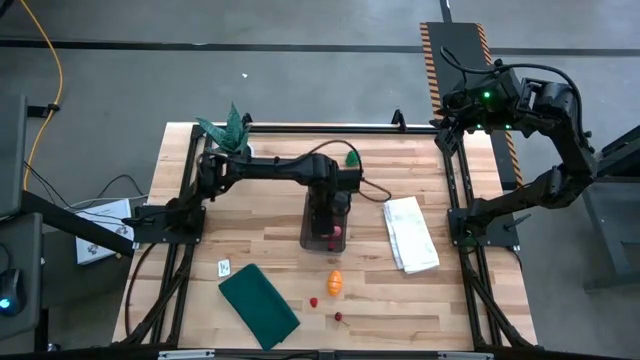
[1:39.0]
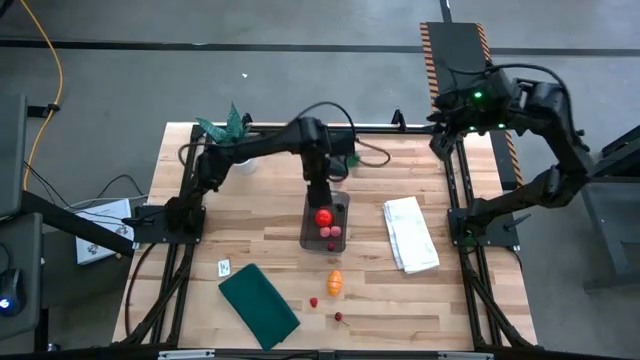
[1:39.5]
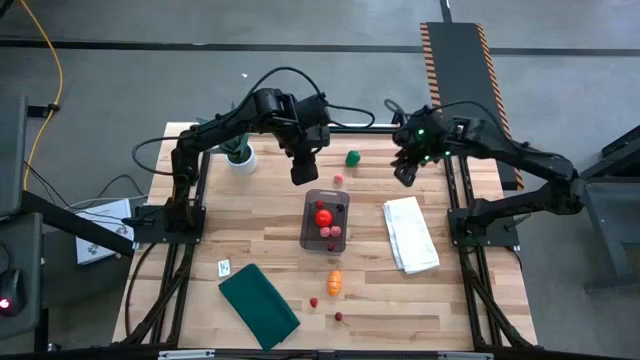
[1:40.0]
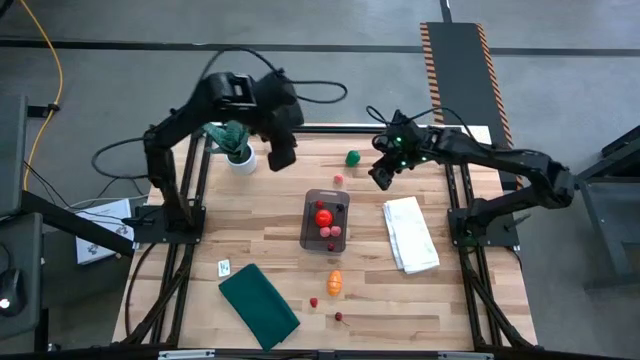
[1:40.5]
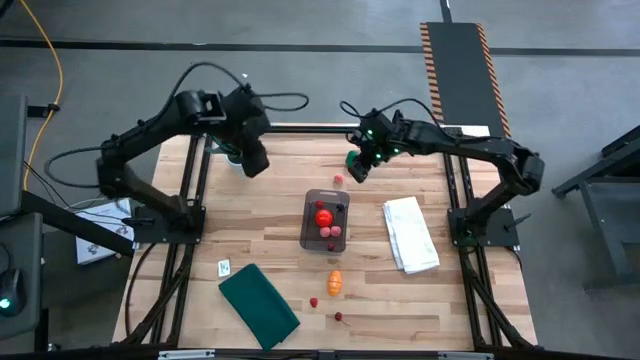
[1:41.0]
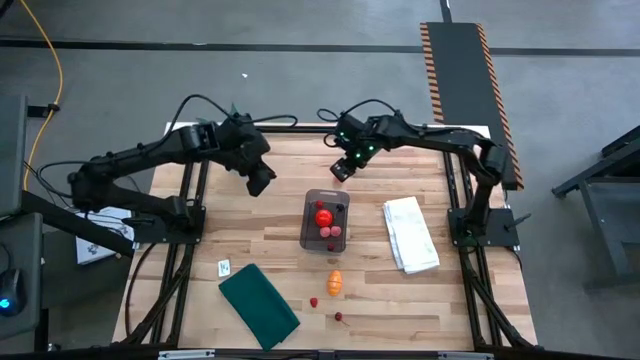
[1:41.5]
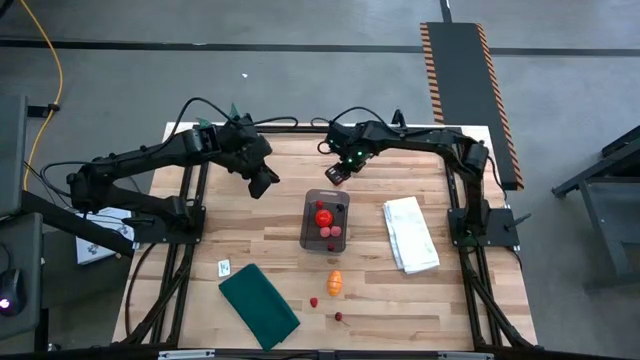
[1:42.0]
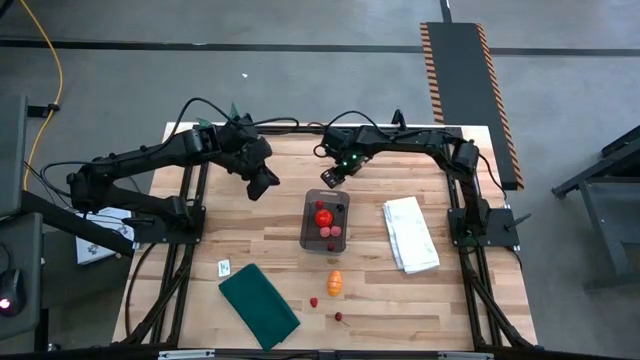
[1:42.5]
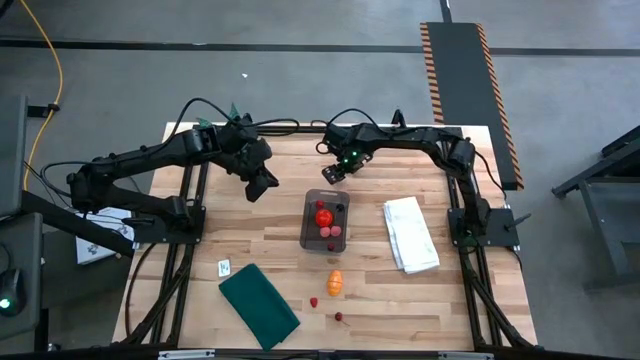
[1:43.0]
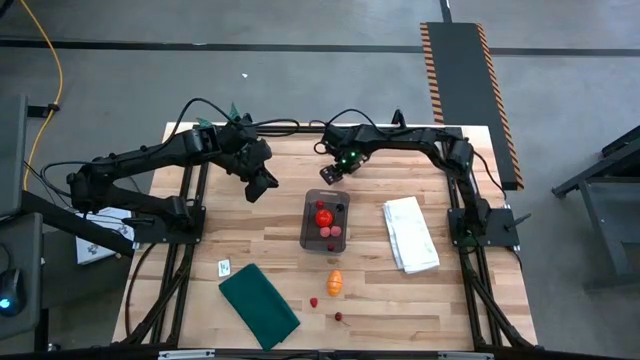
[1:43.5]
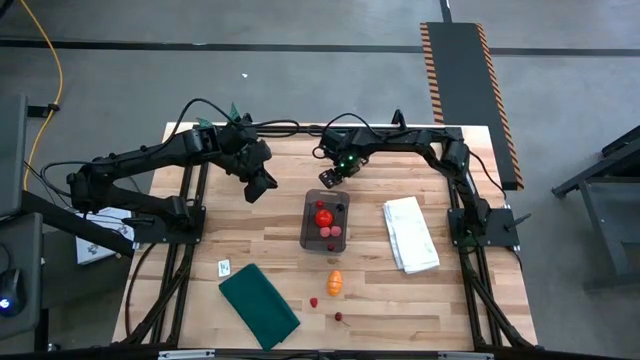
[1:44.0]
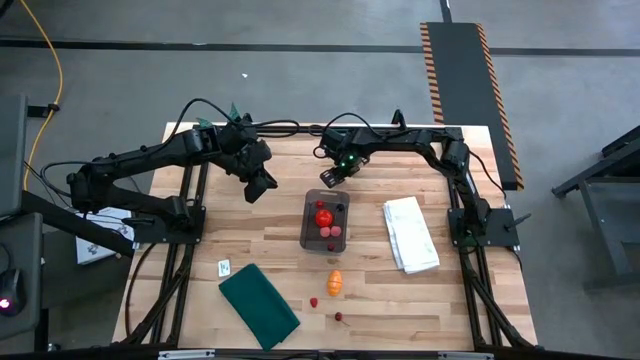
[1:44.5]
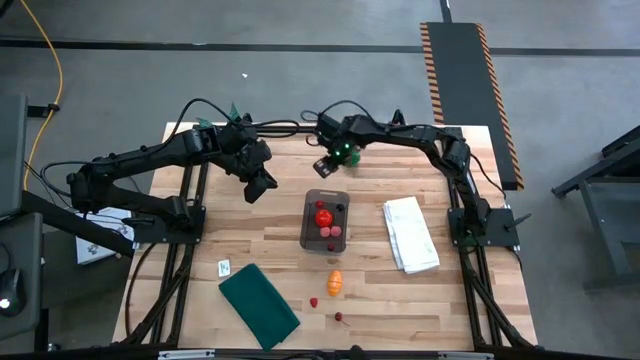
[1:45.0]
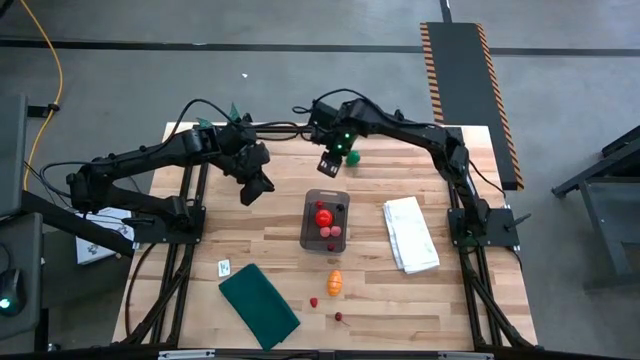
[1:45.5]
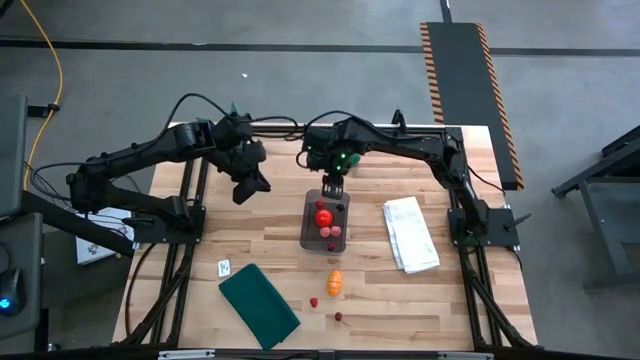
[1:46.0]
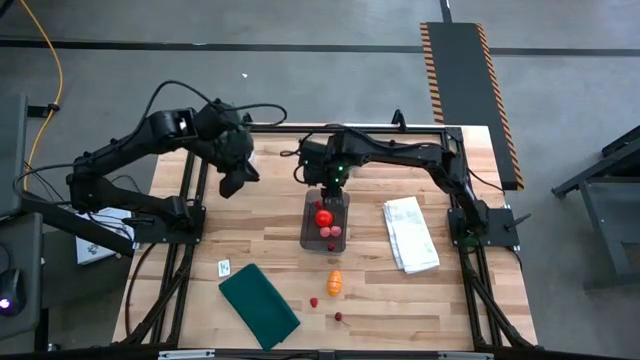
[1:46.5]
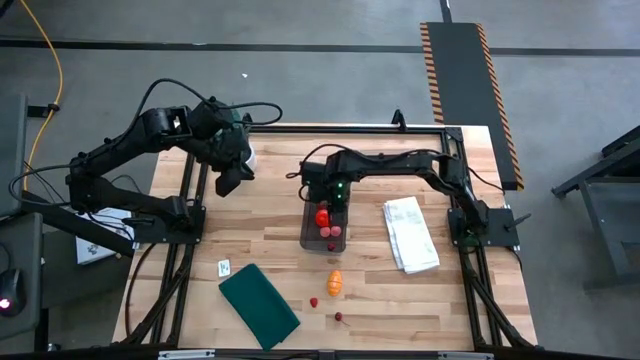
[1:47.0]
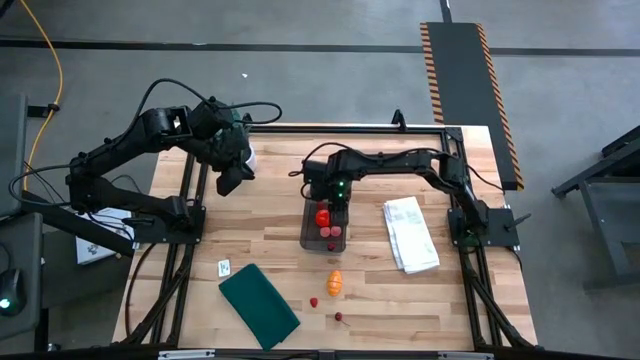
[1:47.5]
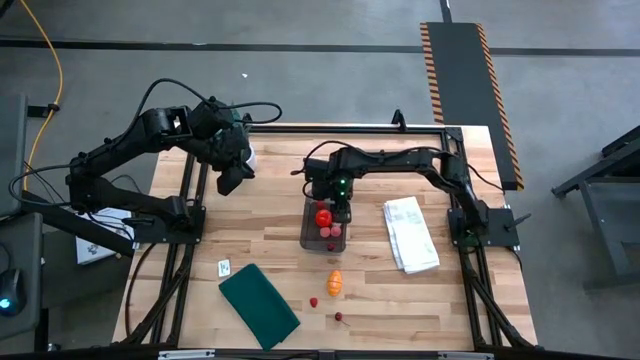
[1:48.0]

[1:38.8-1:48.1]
Task: Pick and placing Produce into tupperware
Put the pink peach into the transparent black bin

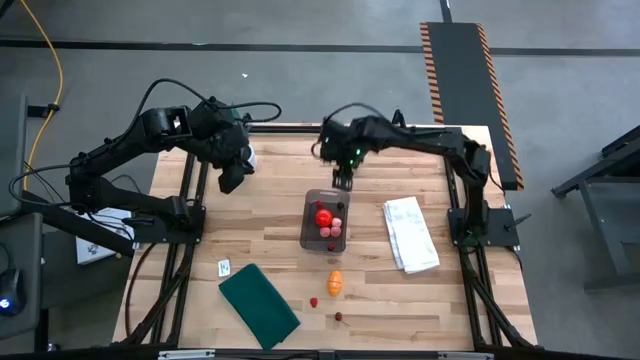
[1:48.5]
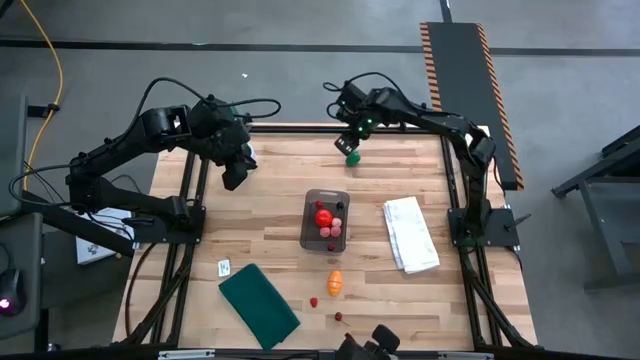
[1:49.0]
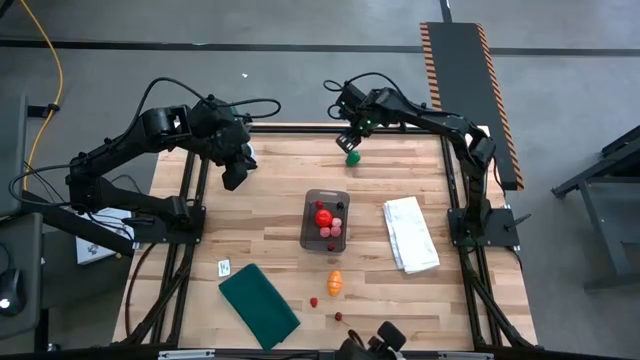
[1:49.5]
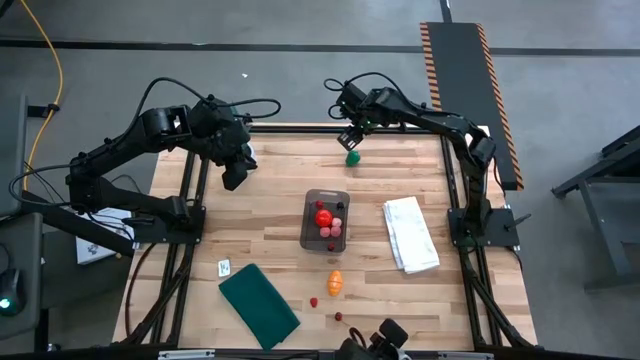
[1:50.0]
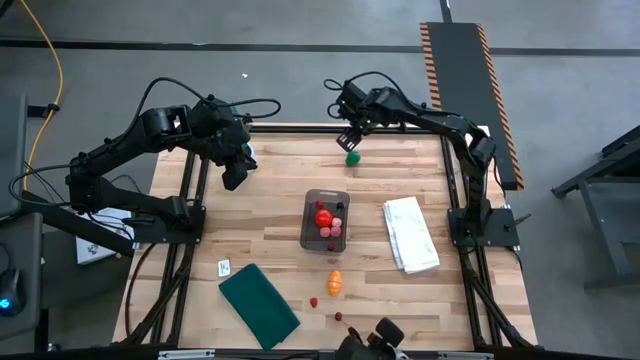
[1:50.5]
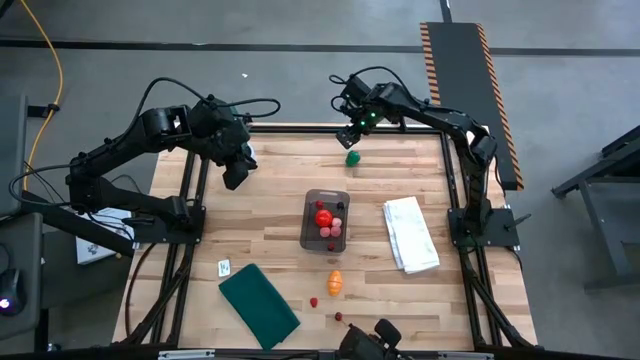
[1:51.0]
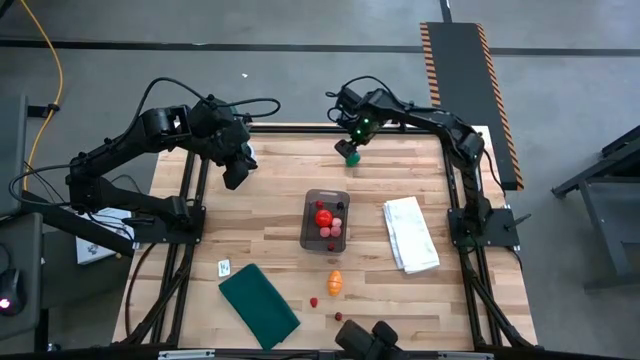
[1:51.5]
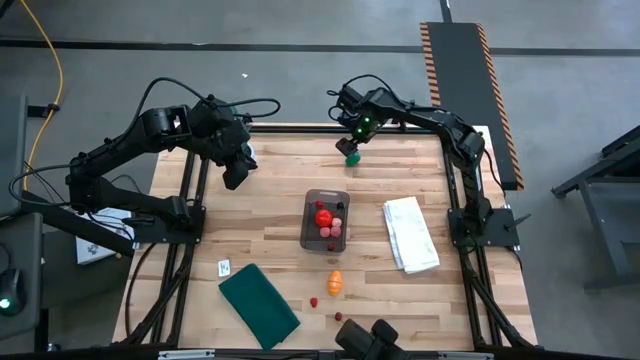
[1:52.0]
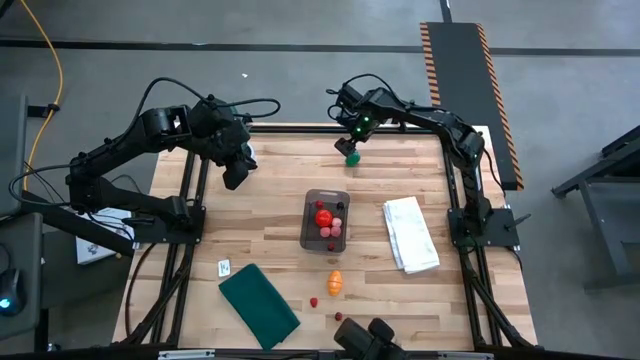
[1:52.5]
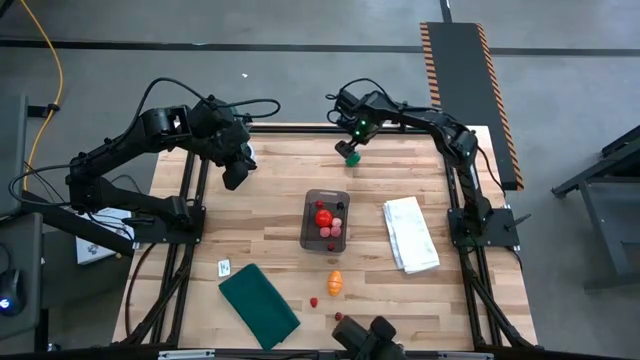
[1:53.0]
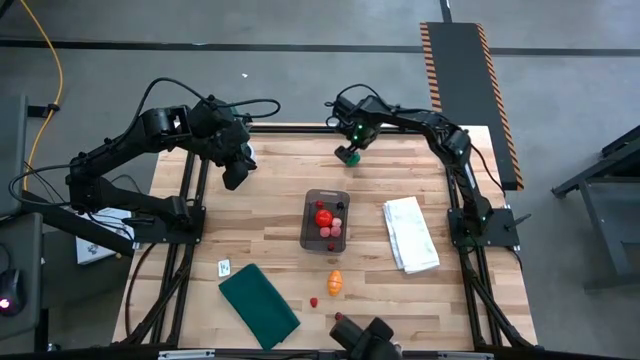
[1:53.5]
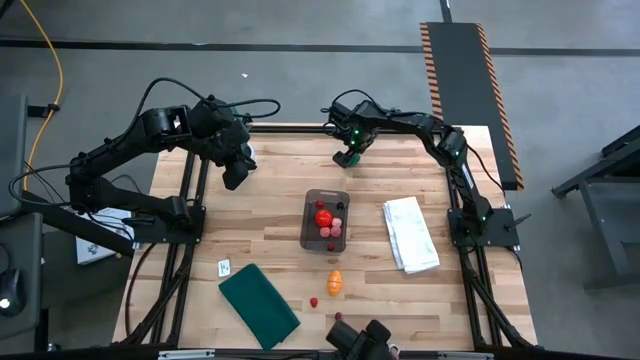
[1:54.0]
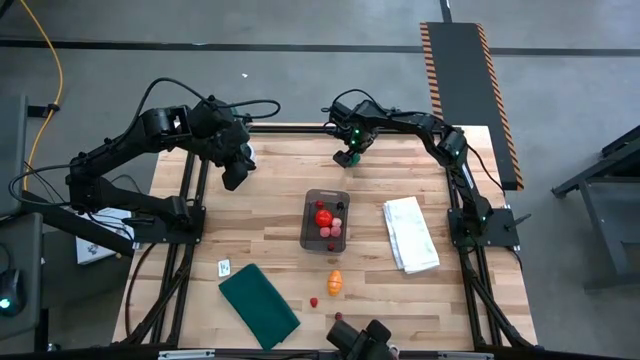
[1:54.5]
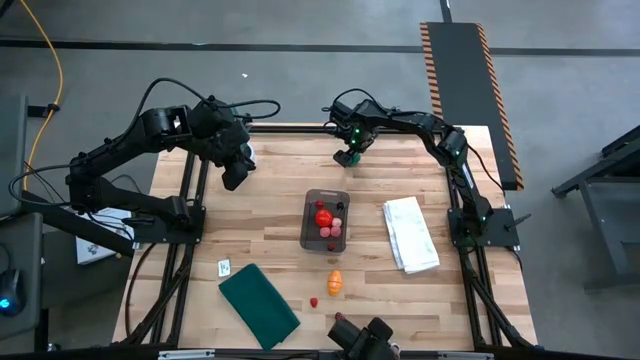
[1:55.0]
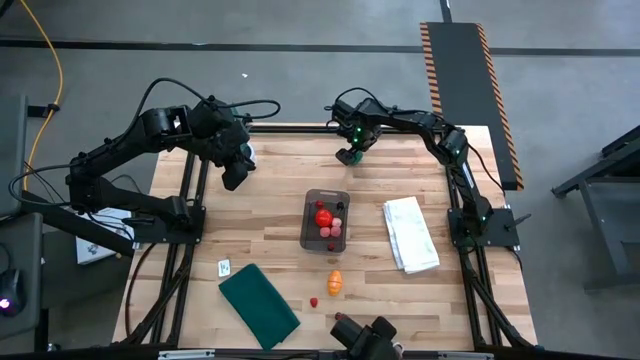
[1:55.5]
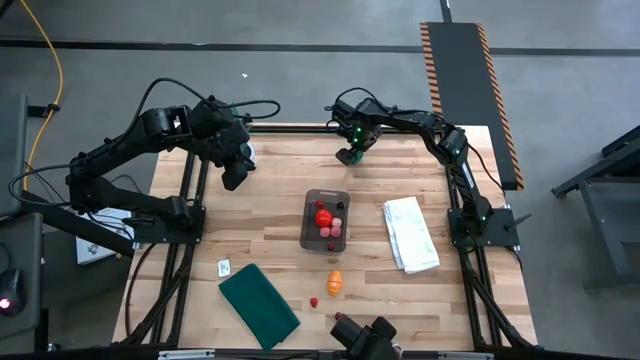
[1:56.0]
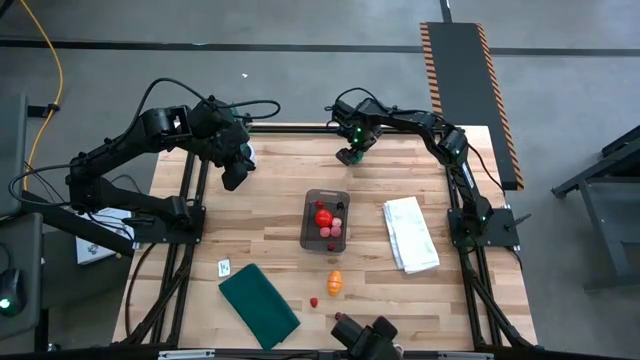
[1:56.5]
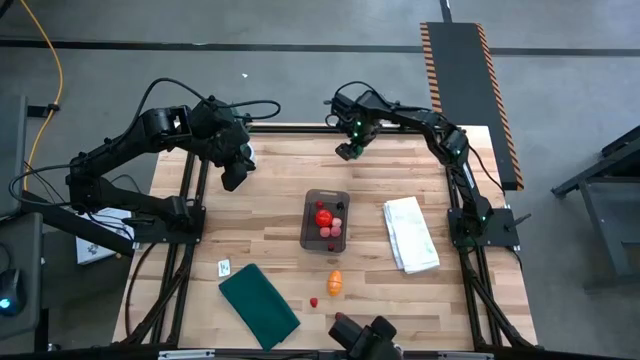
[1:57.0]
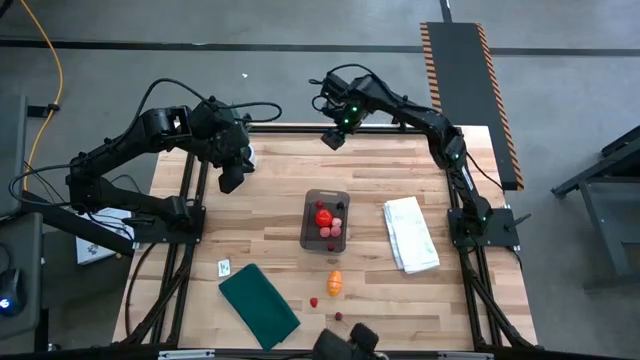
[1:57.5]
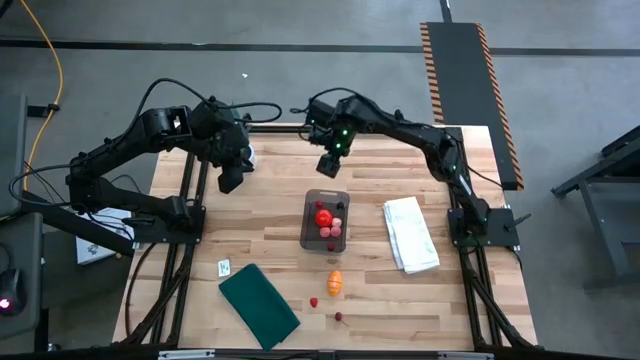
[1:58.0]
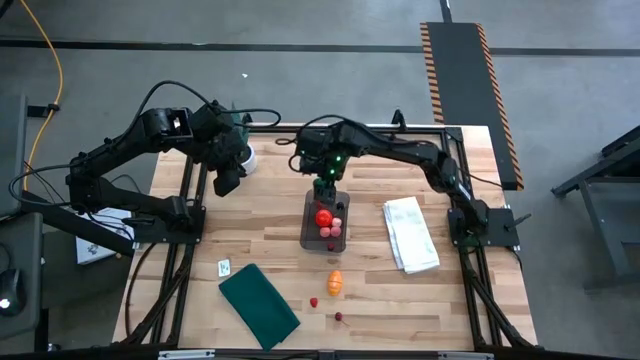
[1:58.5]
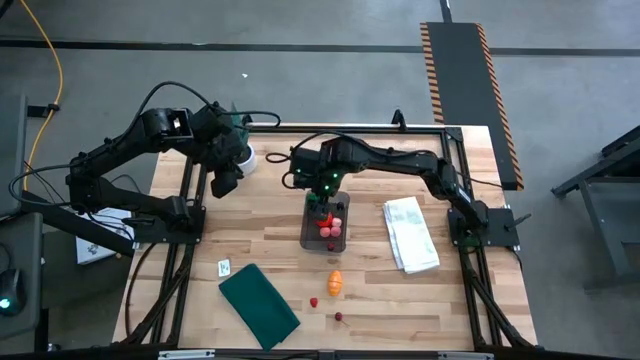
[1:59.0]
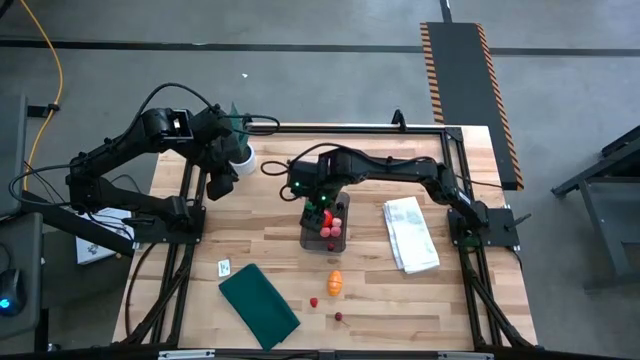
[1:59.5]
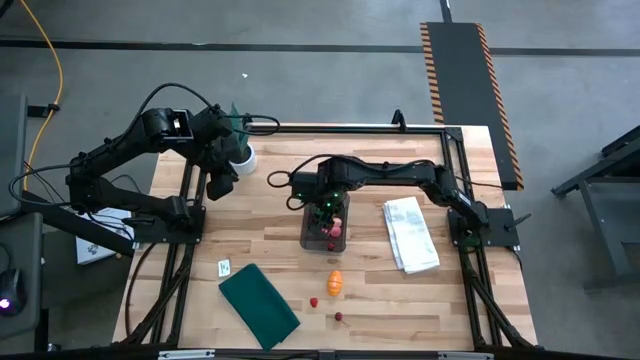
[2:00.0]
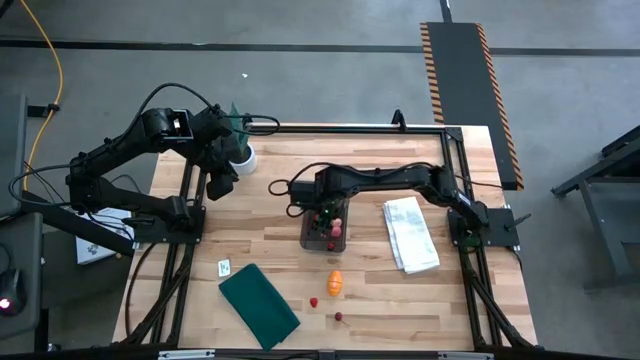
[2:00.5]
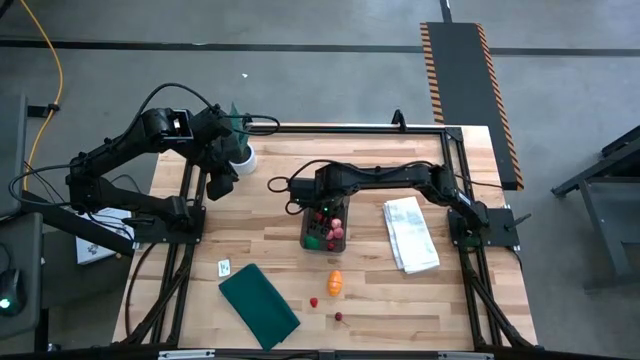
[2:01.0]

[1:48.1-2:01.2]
Put the green bell pepper into the transparent black bin
